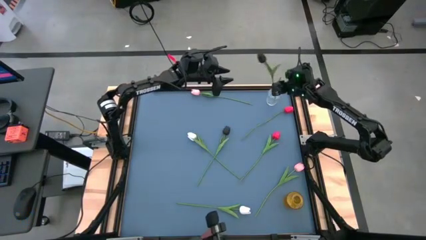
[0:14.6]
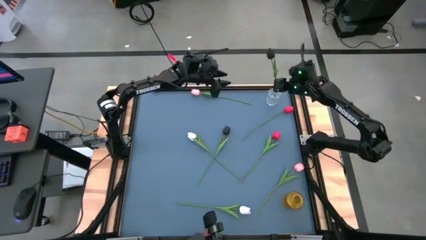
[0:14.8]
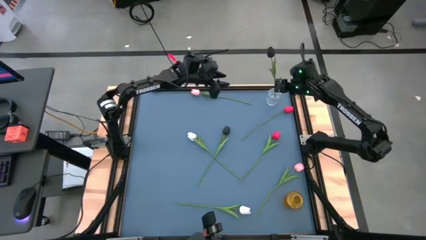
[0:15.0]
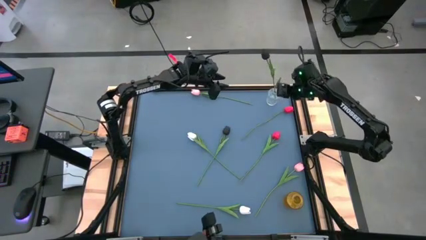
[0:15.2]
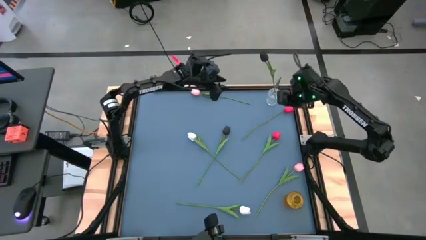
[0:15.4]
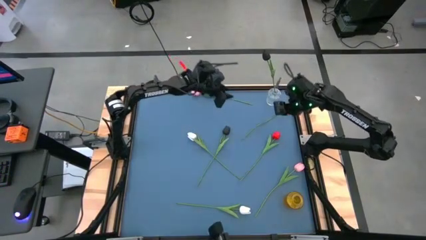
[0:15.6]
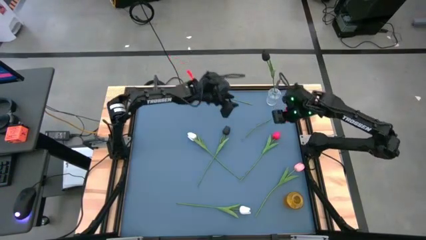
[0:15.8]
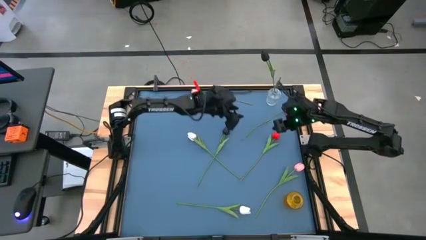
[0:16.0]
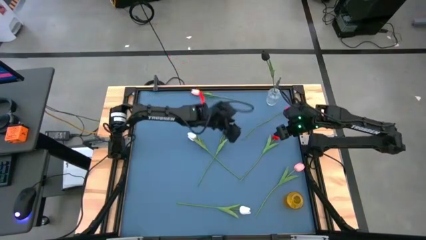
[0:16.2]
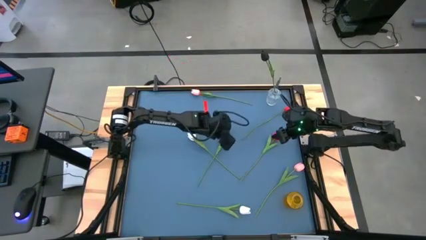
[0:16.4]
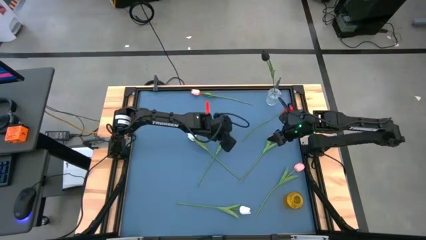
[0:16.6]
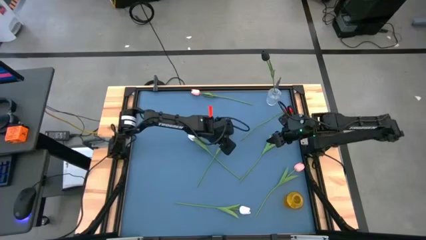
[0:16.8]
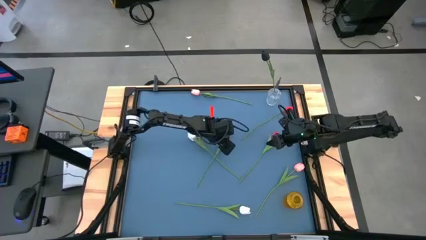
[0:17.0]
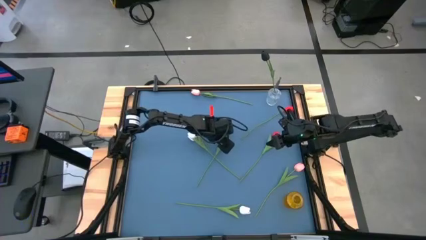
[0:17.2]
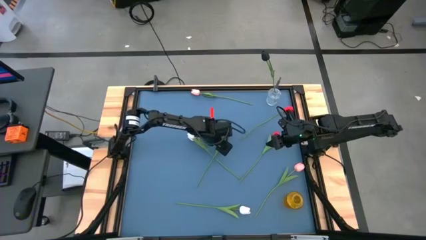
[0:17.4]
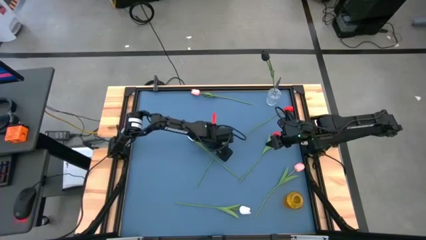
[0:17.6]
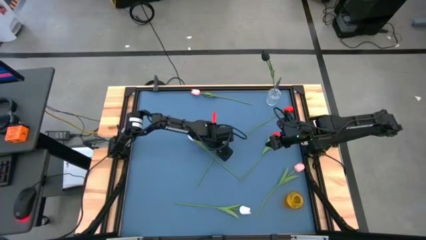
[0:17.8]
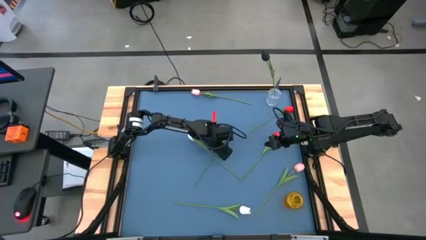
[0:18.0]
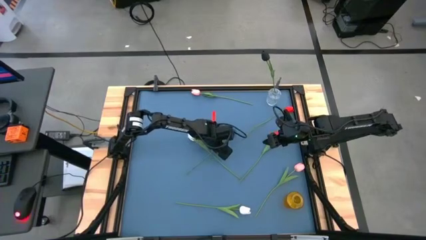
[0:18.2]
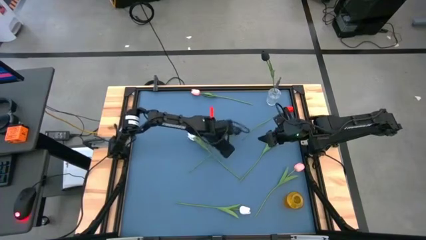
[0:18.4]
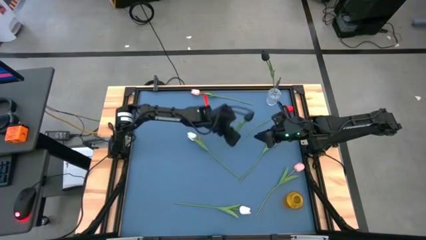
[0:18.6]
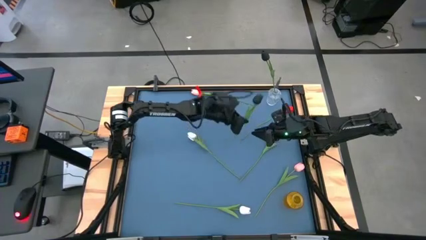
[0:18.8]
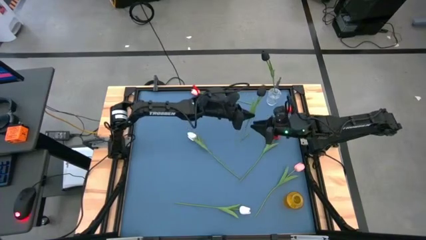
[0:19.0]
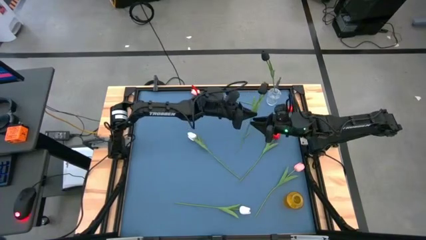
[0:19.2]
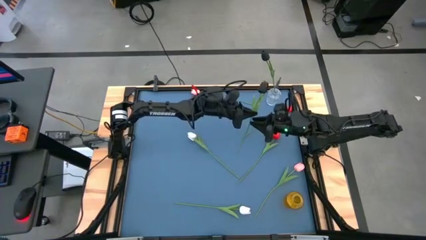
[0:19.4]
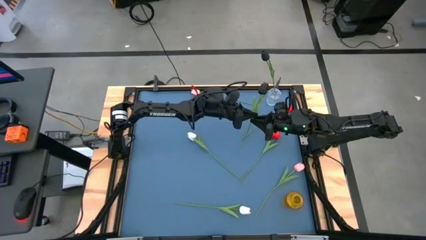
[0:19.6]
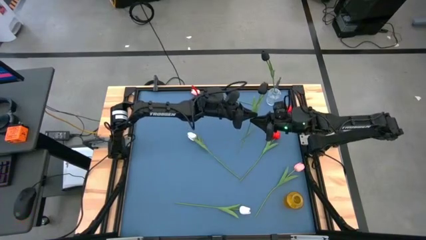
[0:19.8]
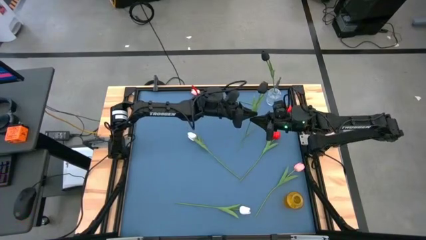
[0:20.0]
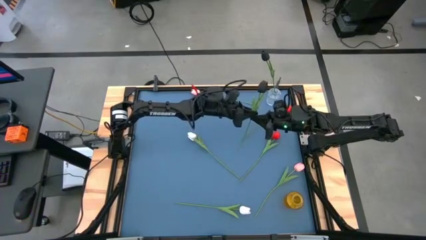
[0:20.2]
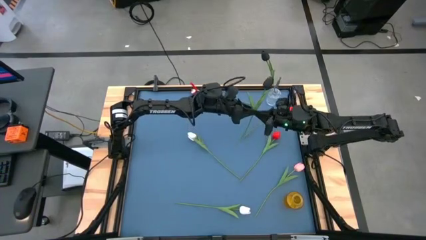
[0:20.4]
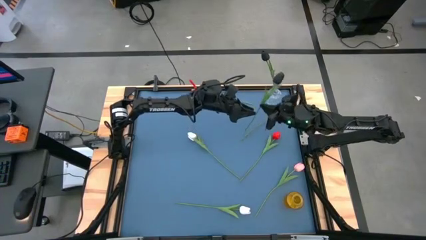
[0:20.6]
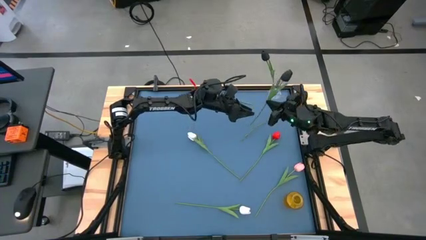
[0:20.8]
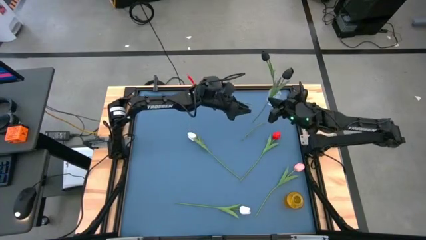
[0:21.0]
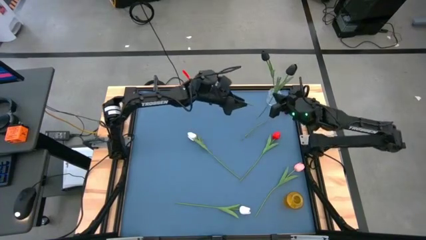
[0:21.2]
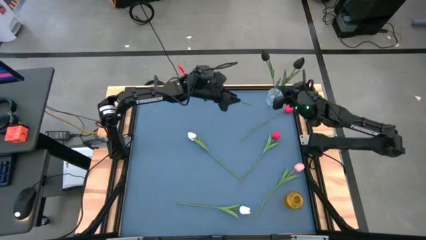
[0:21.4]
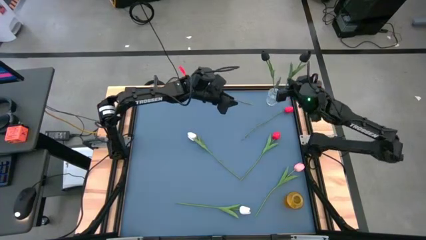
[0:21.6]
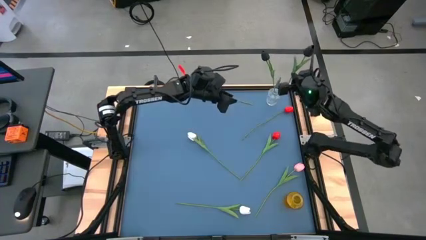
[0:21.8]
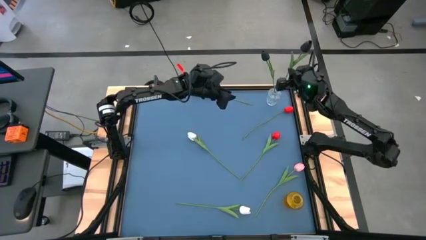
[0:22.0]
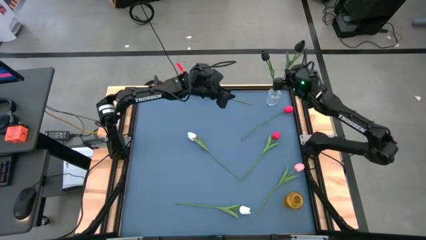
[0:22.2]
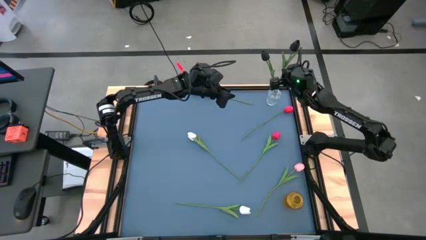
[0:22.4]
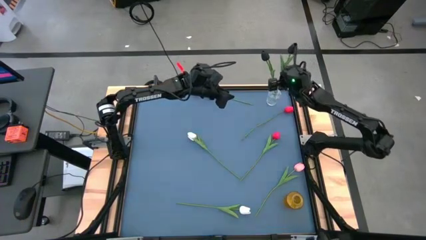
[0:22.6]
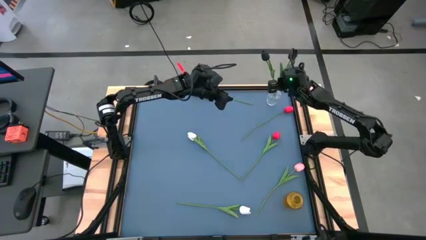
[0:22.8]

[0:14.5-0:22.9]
Task: Sort flowers into vase by color
Put the black flower into the transparent vase

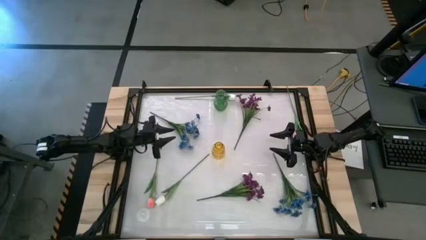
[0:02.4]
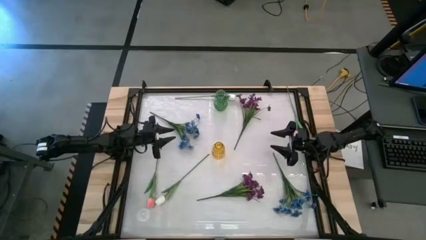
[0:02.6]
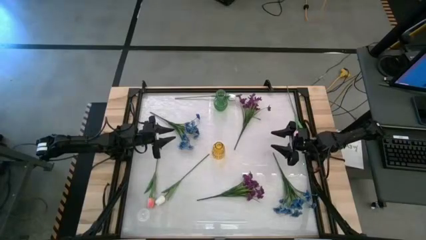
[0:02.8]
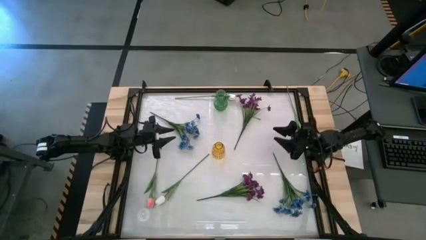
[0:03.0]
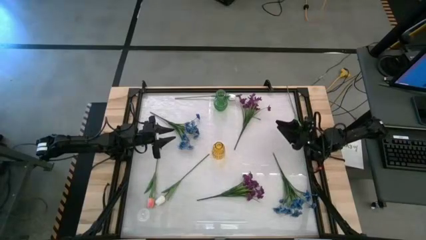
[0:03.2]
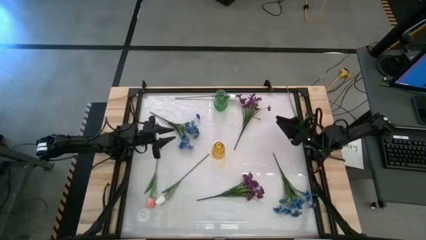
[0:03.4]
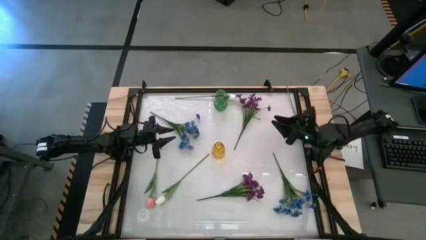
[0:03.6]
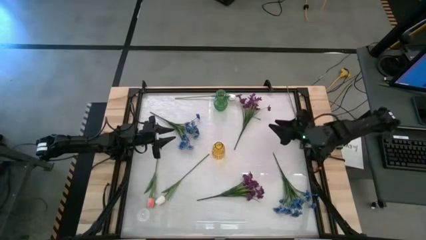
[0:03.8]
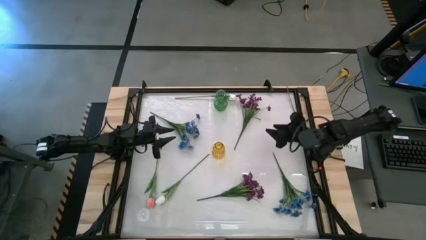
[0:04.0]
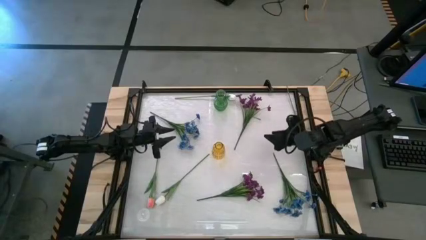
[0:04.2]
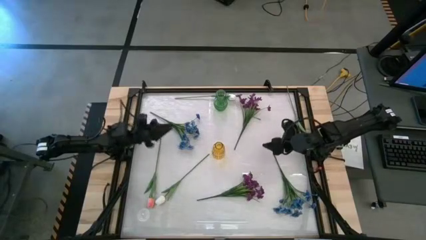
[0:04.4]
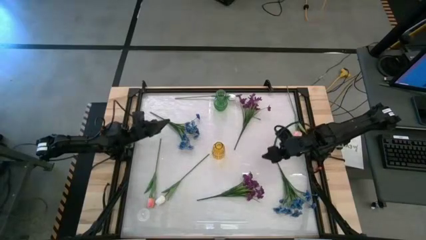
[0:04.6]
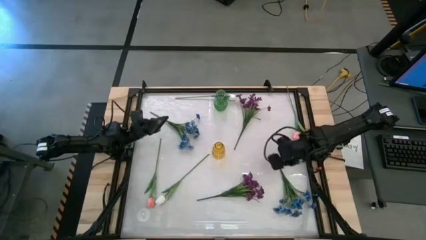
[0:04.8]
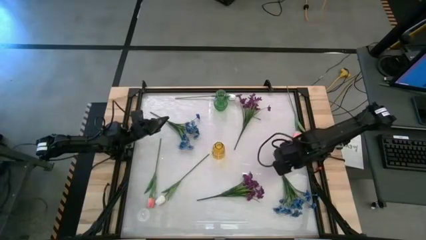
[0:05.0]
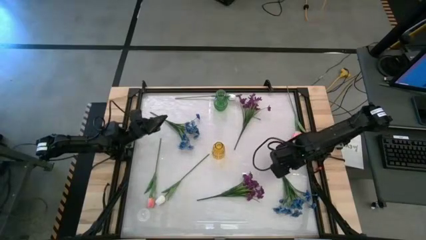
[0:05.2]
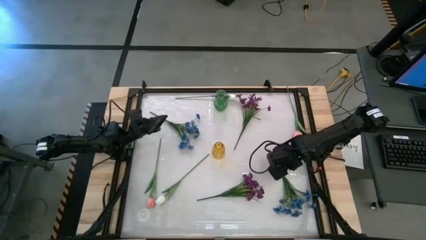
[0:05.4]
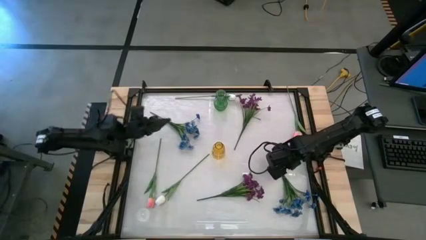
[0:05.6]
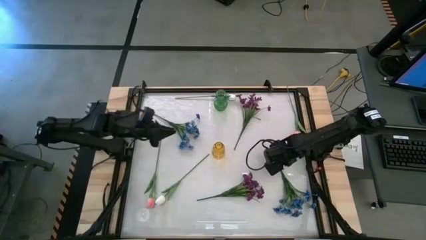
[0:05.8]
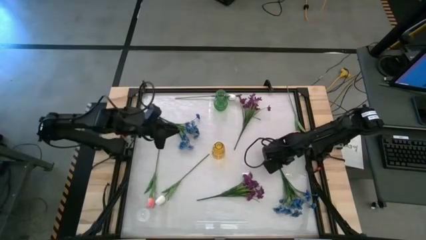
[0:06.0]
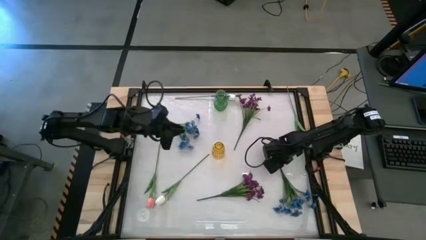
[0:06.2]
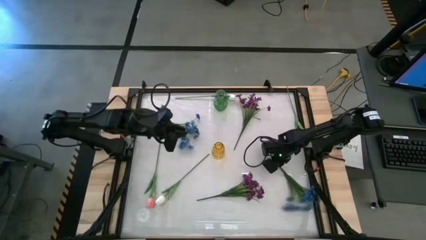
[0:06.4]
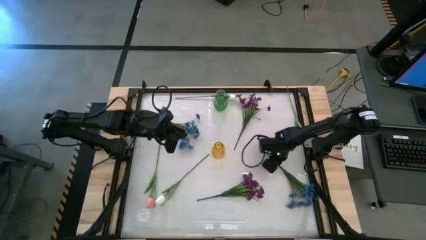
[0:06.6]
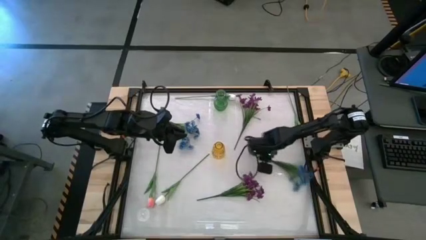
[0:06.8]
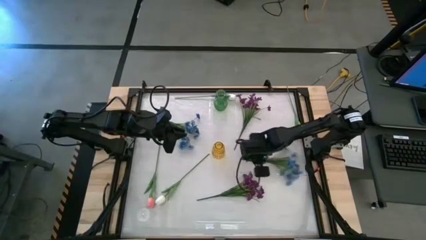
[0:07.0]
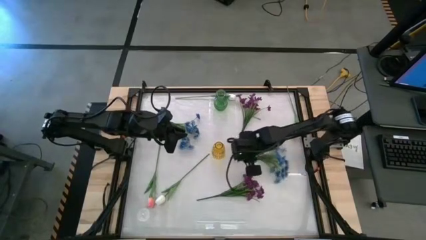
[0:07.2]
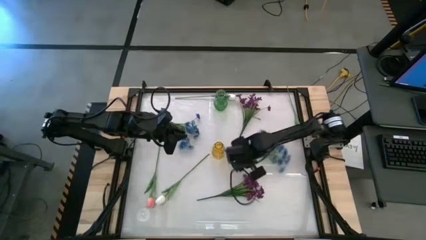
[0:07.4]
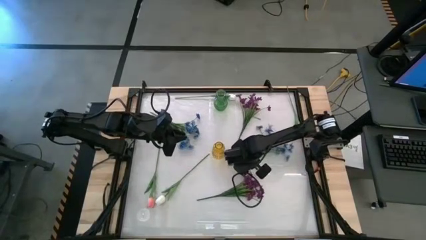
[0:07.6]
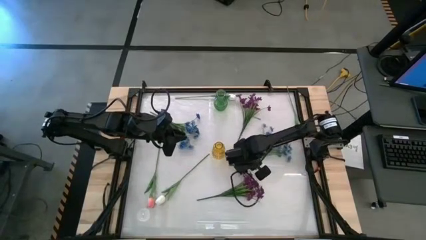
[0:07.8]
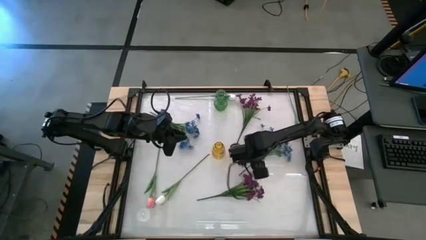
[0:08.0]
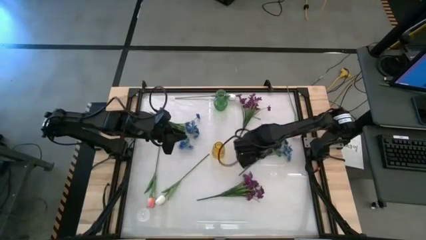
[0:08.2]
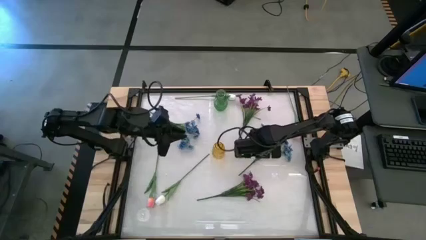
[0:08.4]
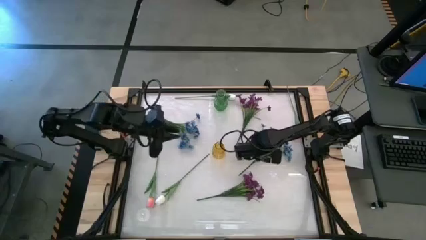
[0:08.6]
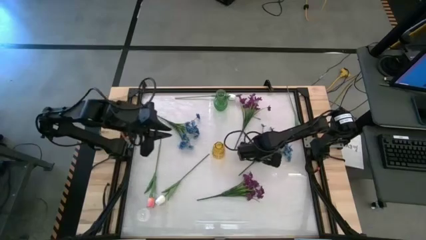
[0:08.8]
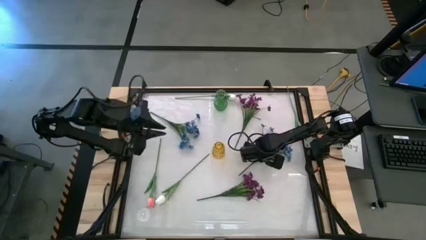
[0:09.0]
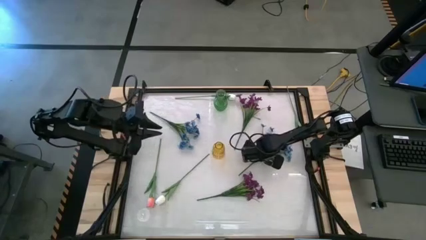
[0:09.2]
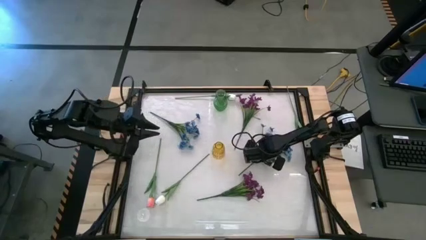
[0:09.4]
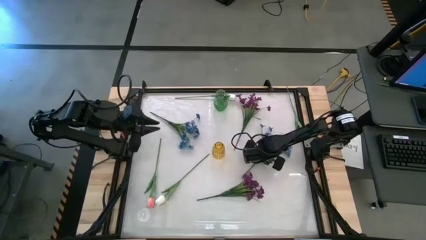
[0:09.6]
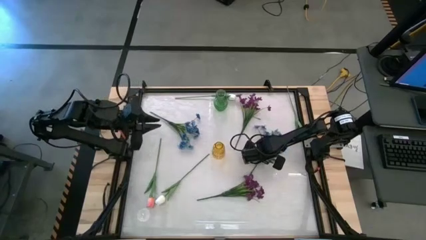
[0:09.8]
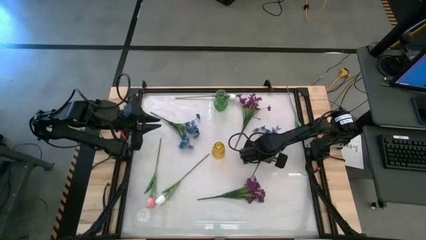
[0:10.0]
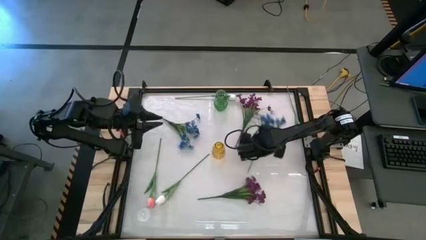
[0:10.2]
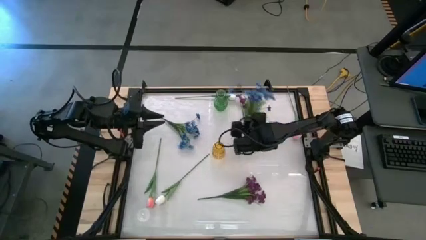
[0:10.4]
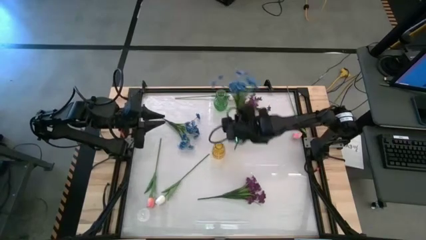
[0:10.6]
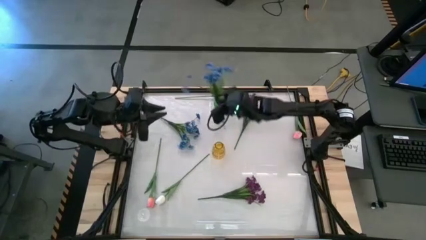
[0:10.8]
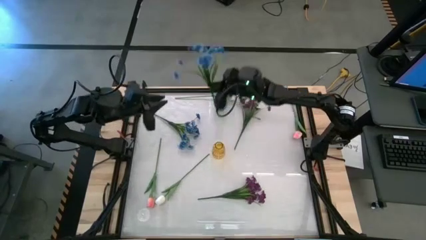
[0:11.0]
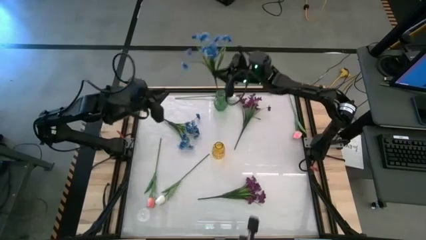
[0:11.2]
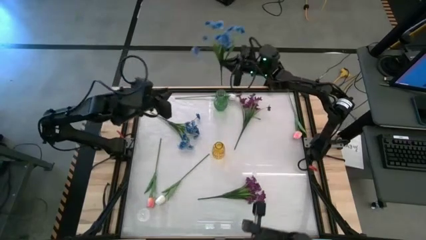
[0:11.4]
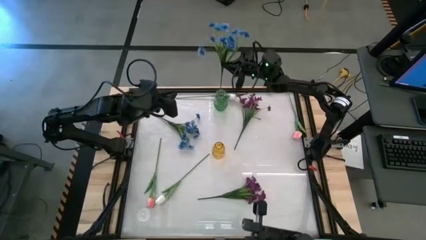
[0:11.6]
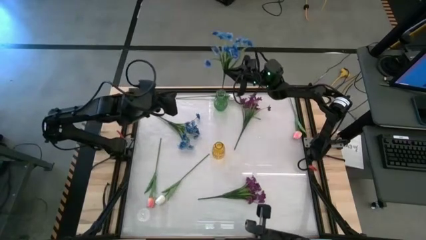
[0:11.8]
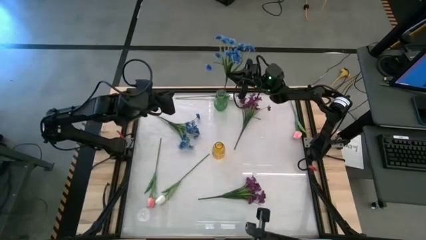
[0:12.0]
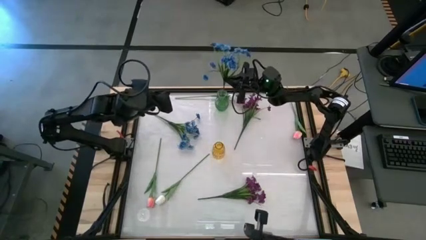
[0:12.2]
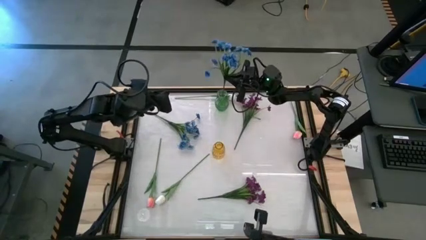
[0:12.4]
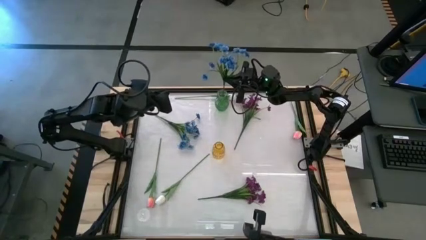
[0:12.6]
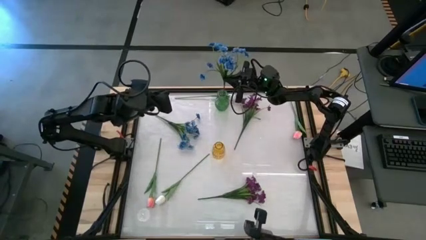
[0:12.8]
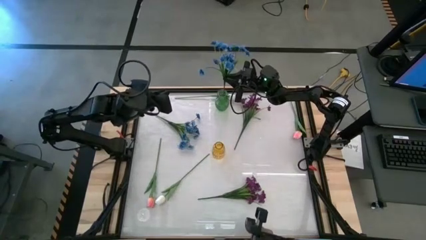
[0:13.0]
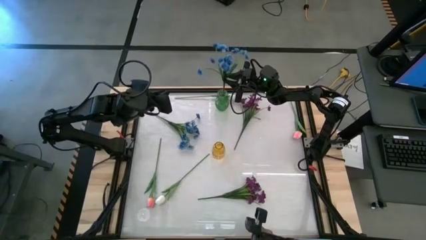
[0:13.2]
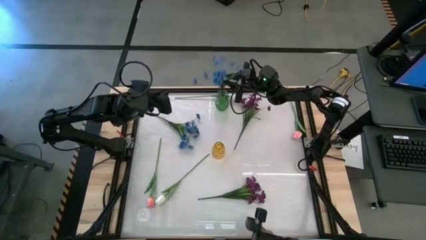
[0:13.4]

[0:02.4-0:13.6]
Task: Sort flowers into vase by color
Put the bottom blue flowers into the green vase
